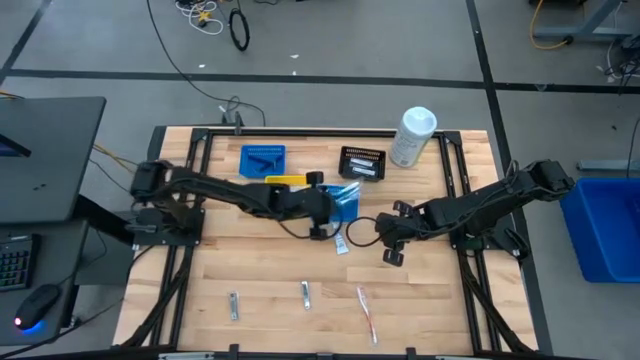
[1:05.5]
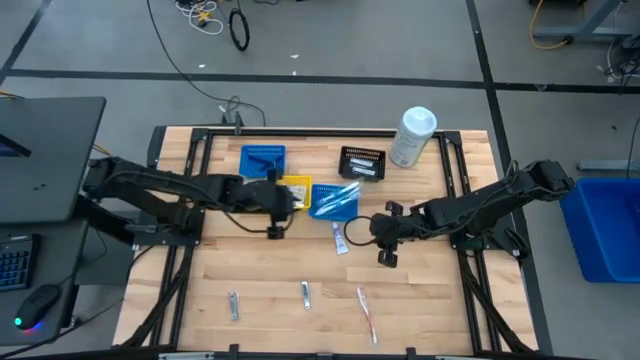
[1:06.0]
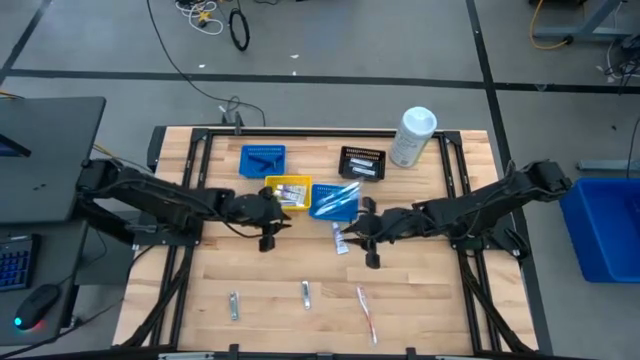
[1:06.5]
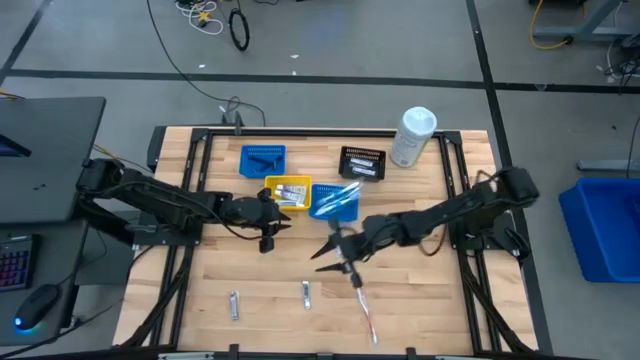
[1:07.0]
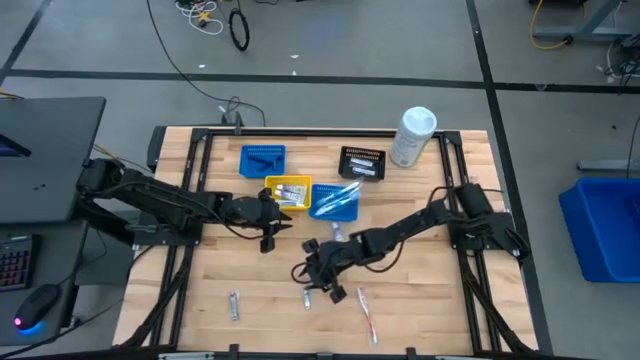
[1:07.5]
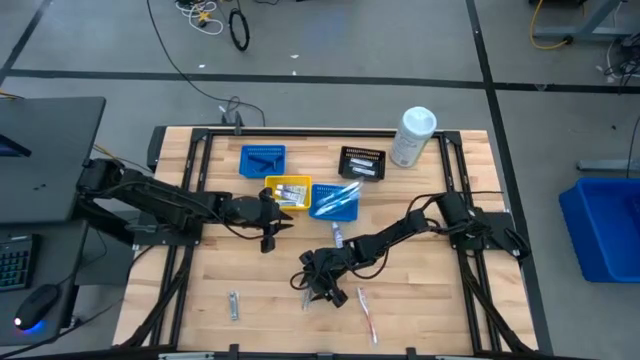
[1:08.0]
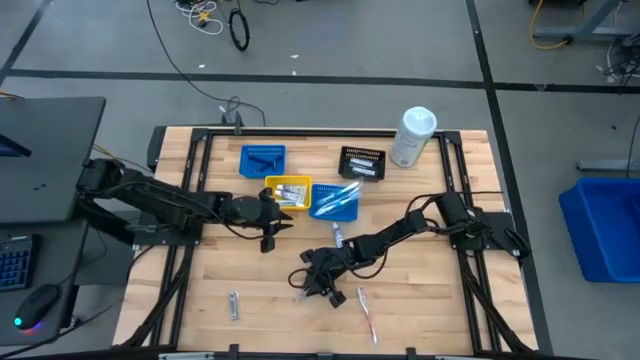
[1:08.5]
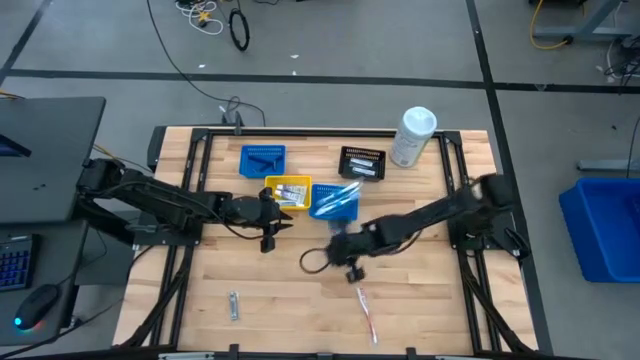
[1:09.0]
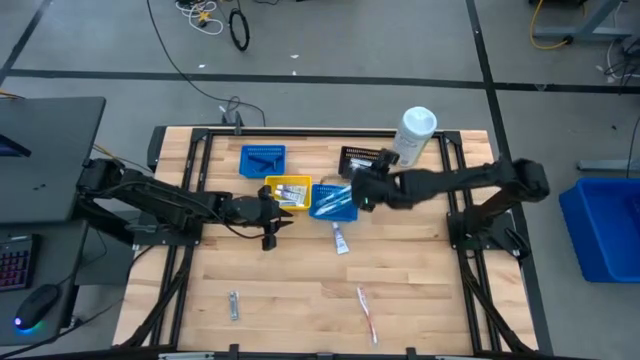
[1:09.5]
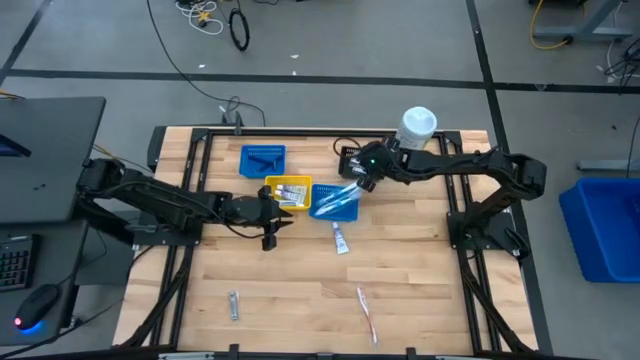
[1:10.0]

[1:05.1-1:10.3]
Task: Pick & Place Travel size toiletries
Put the nail cutter into the black basket

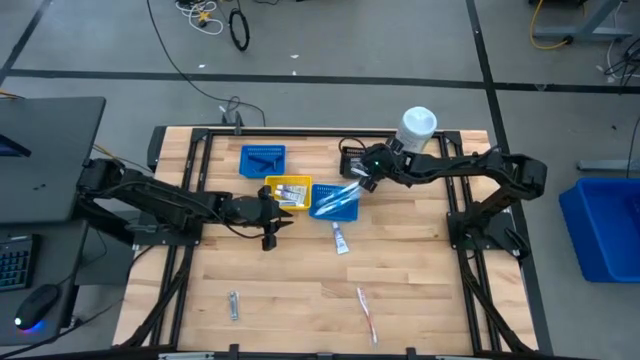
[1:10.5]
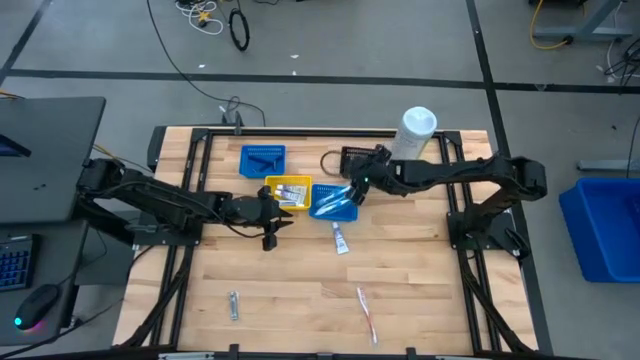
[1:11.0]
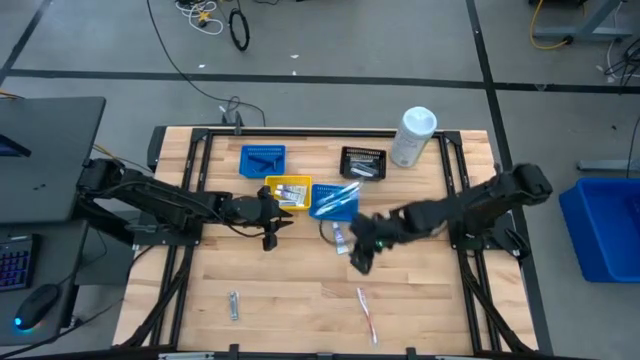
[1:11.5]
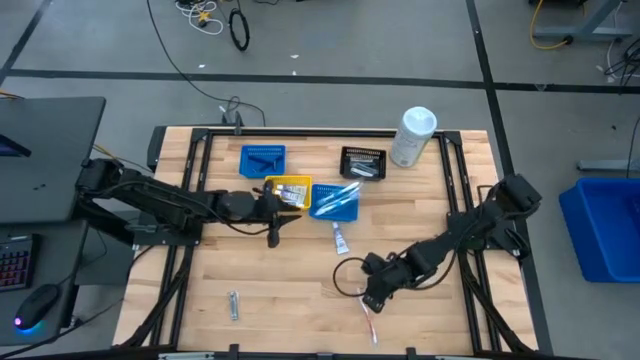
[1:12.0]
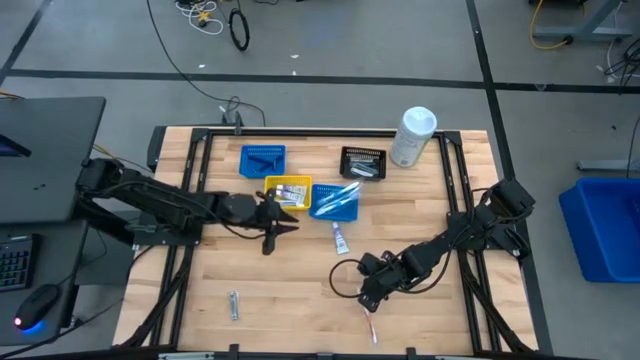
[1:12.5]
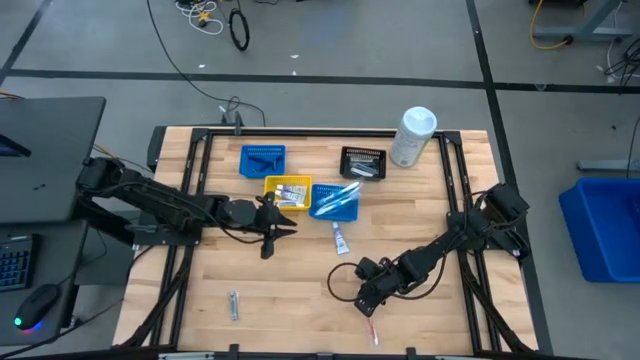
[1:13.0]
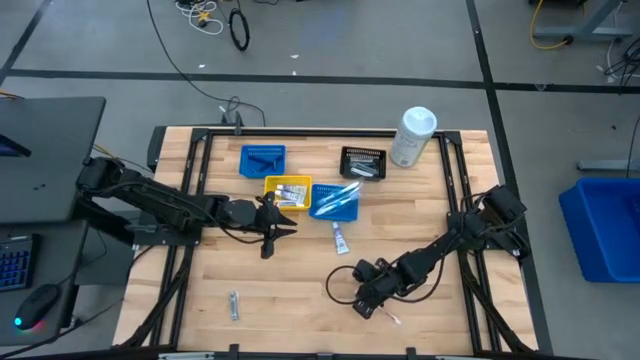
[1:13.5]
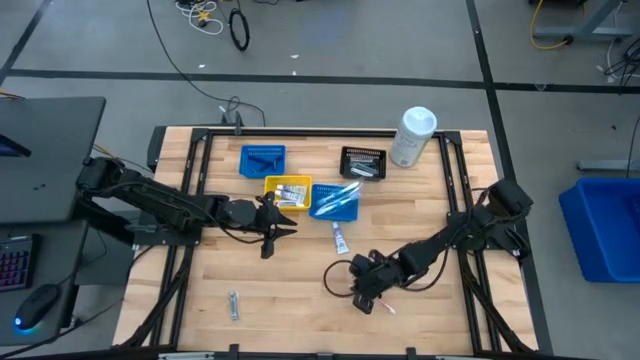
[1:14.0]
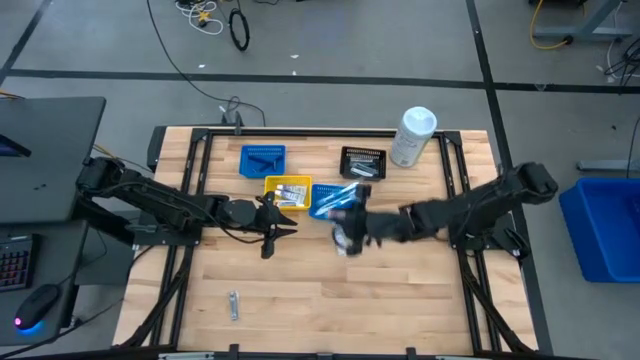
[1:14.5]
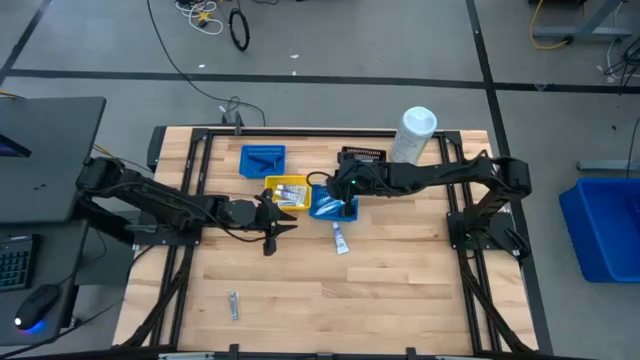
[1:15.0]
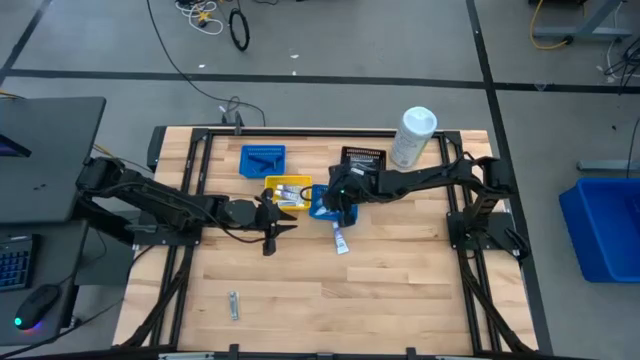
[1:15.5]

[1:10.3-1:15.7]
Put the orange toothbrush into the right blue basket

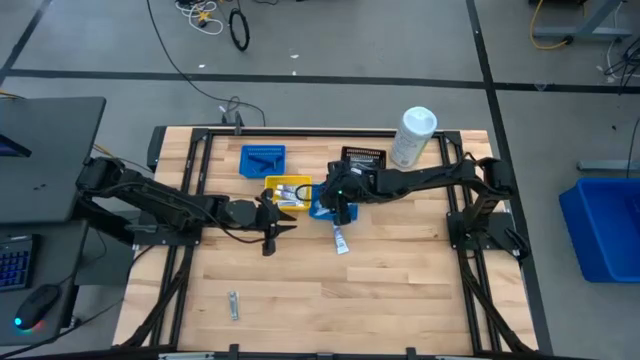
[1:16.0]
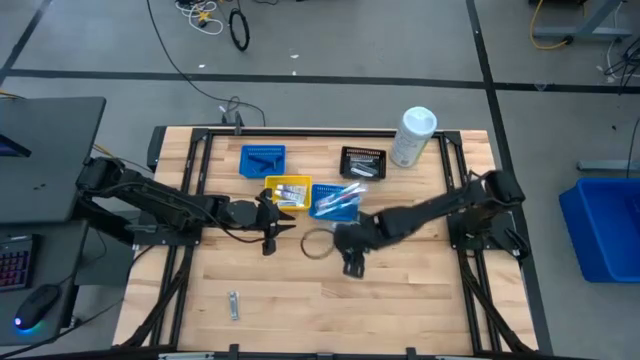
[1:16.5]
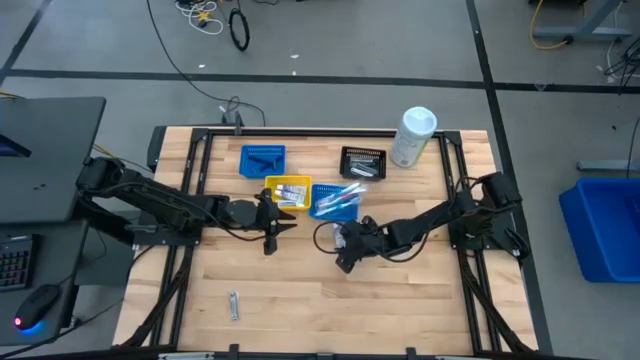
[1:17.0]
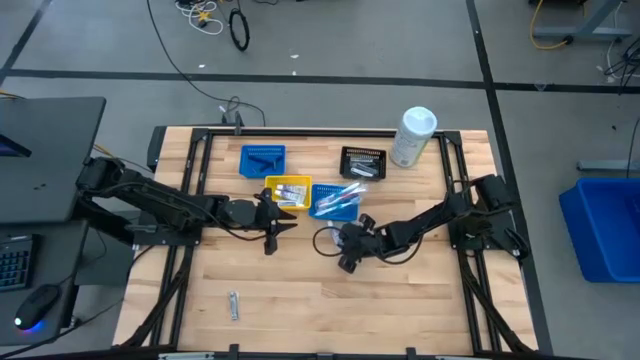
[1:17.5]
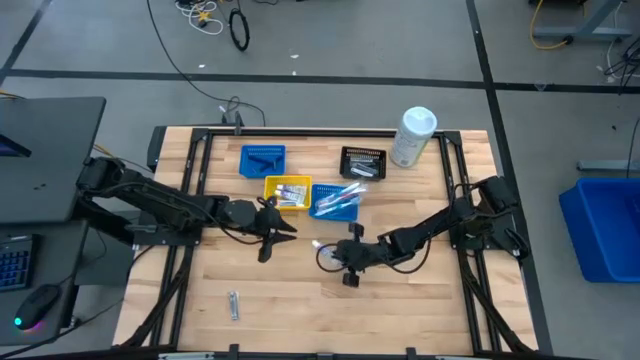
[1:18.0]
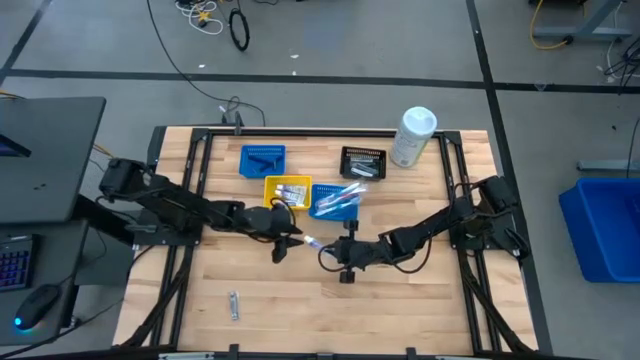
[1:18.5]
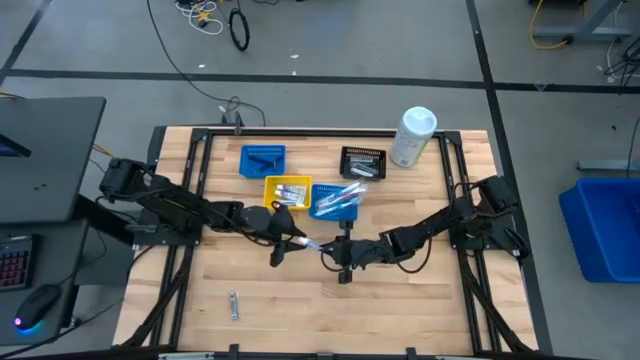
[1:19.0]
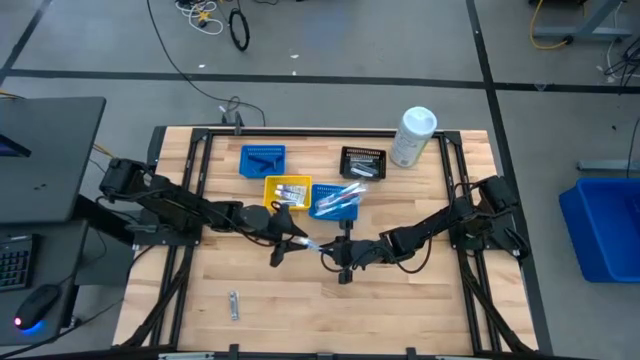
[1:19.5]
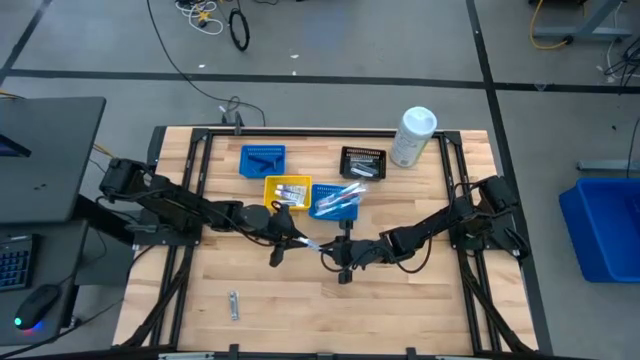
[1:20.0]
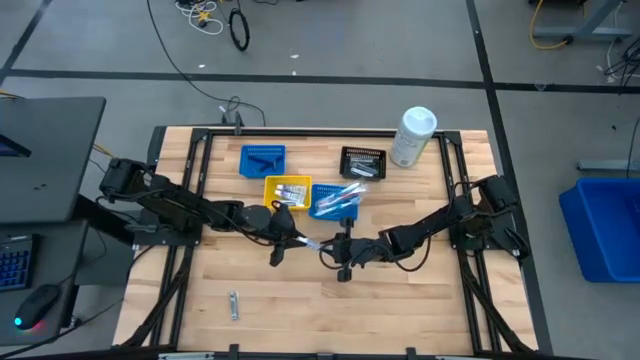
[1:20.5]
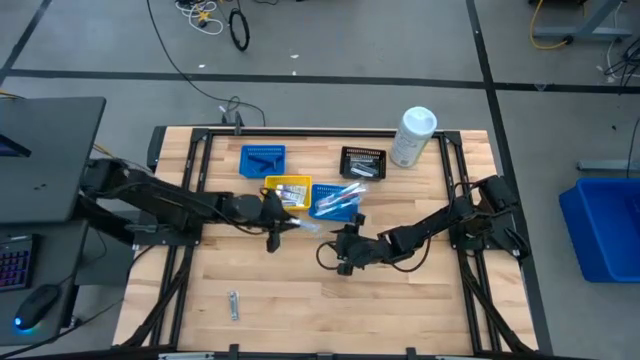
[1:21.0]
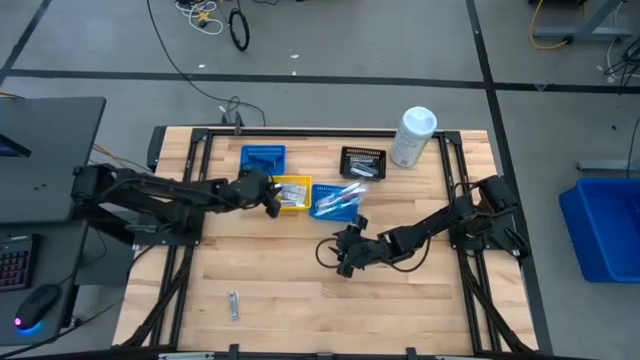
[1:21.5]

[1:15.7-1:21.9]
Put the toothpaste into the yellow basket

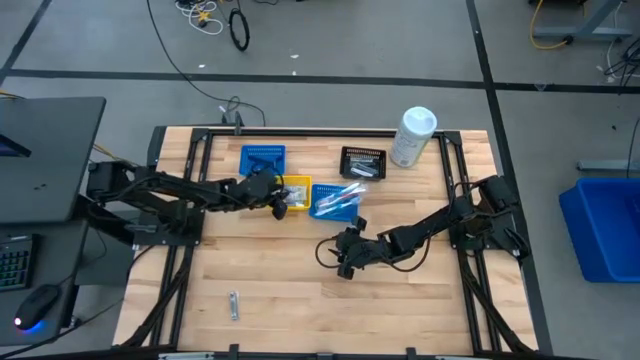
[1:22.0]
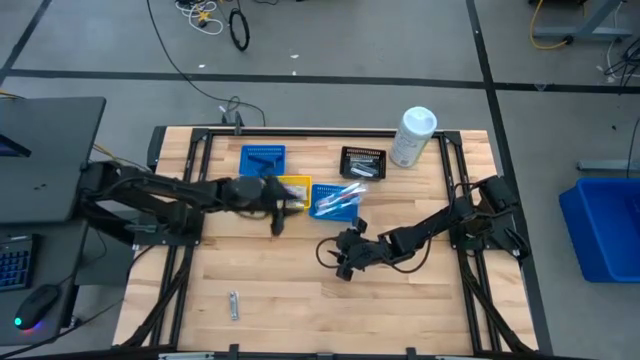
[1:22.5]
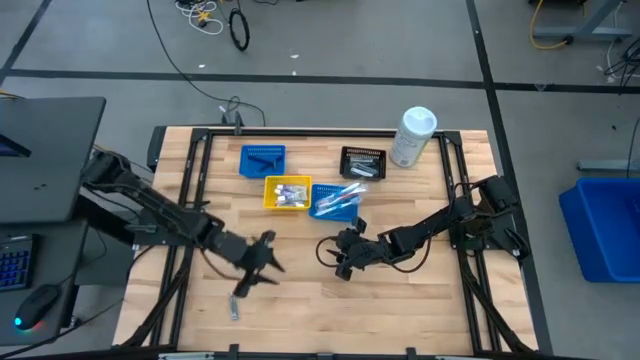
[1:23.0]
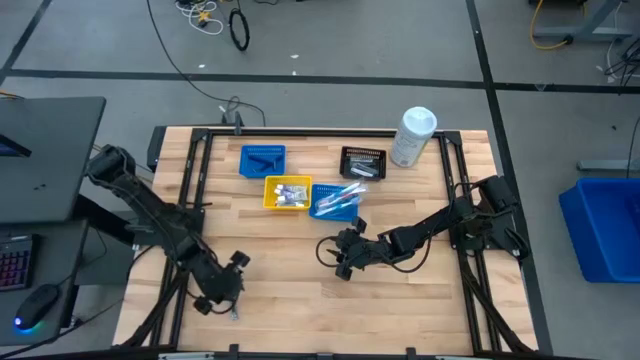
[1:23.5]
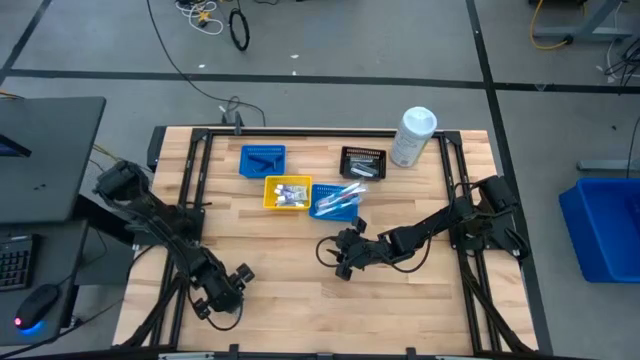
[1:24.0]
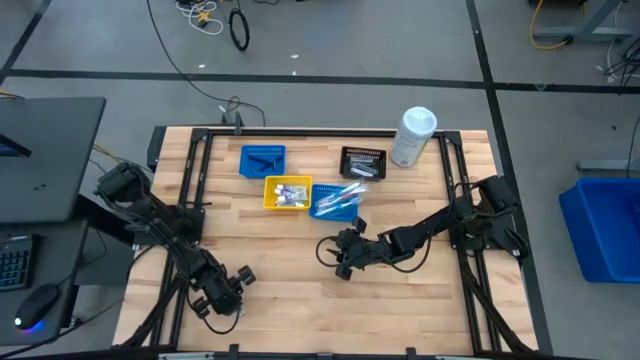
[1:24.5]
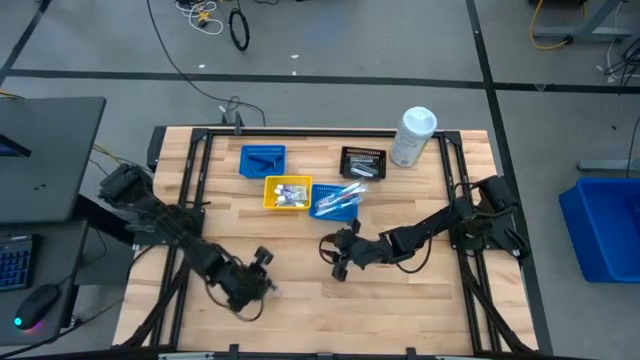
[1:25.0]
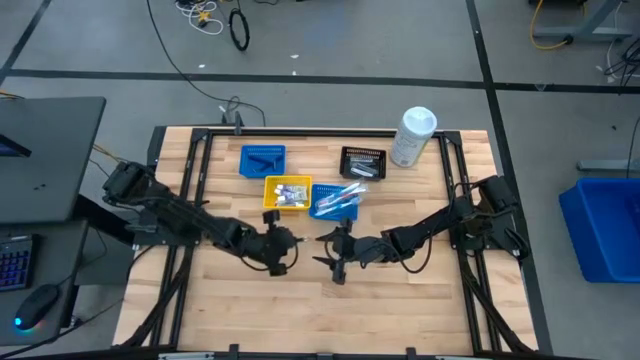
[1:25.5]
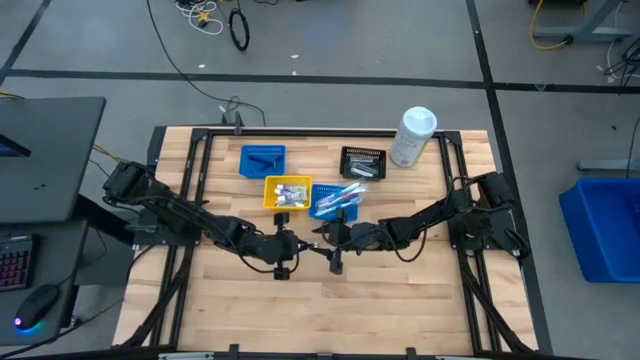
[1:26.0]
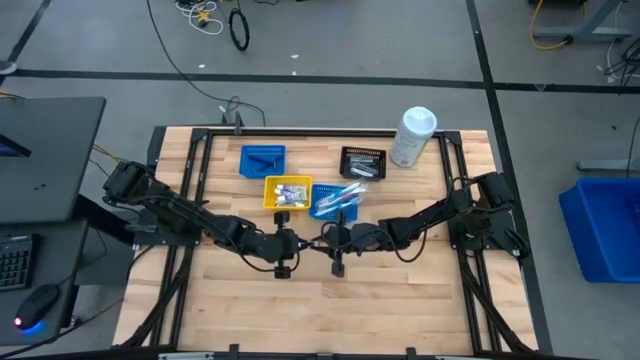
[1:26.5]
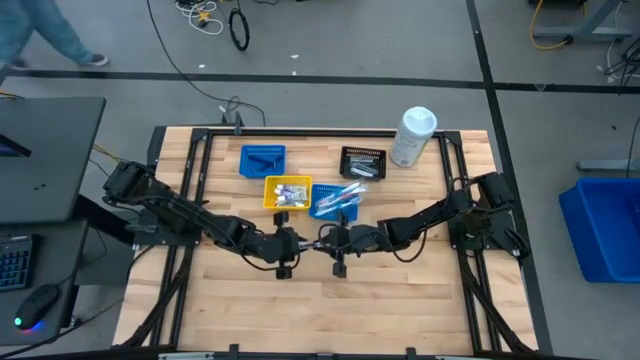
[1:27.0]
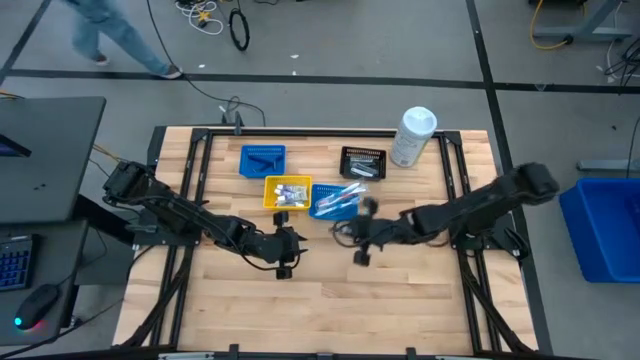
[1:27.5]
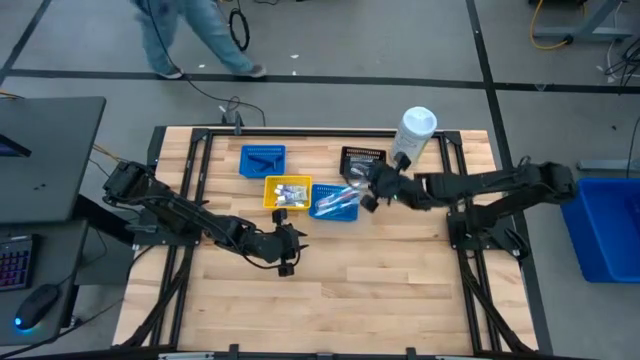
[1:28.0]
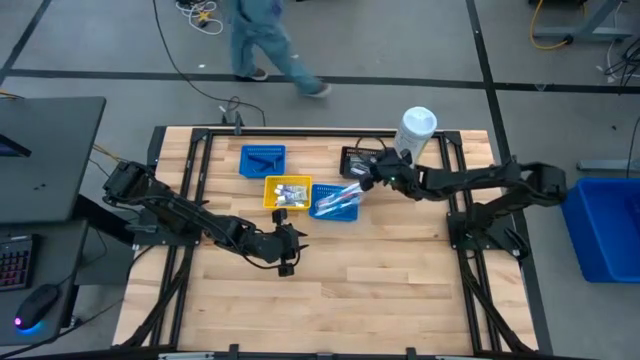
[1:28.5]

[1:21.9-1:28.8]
Put the nail cutter into the black basket
